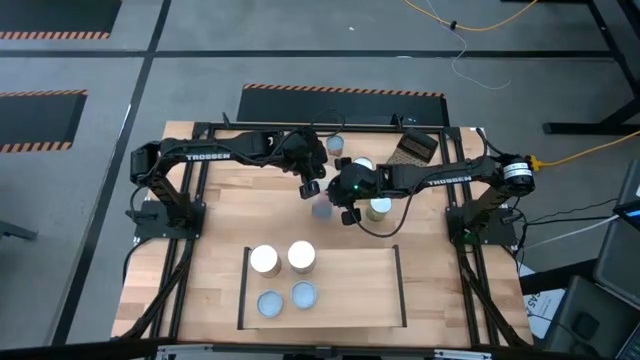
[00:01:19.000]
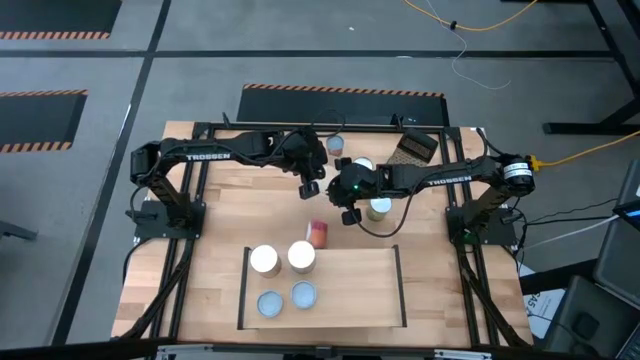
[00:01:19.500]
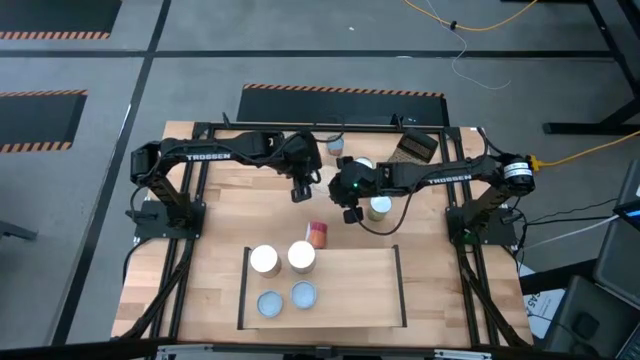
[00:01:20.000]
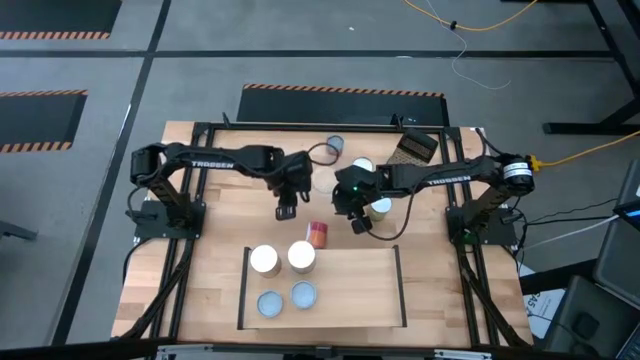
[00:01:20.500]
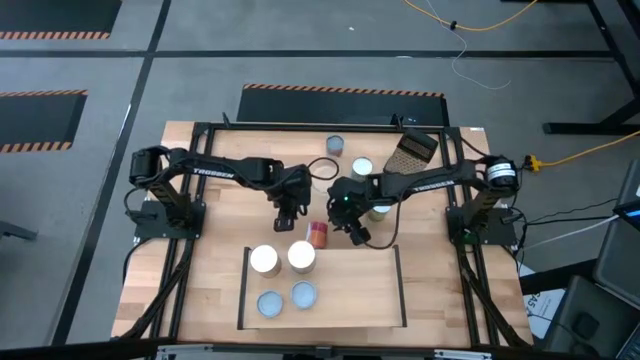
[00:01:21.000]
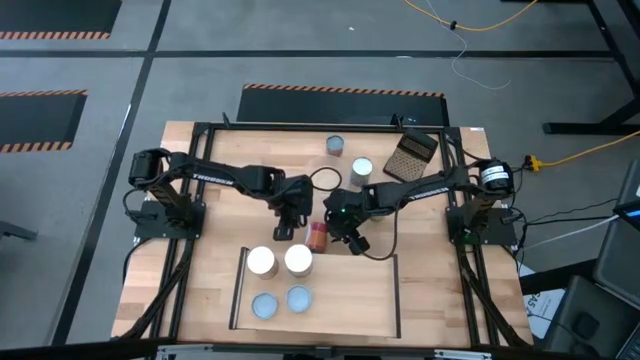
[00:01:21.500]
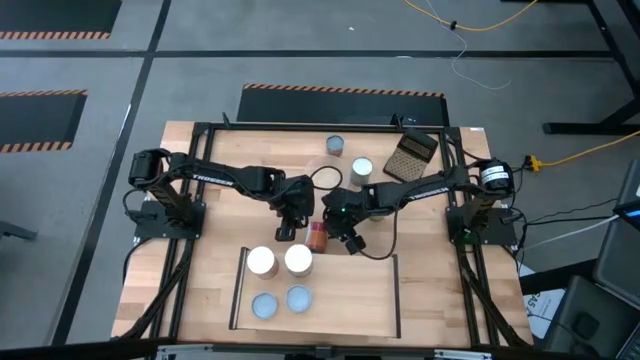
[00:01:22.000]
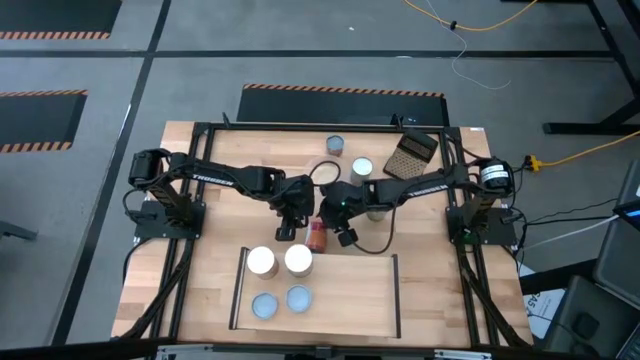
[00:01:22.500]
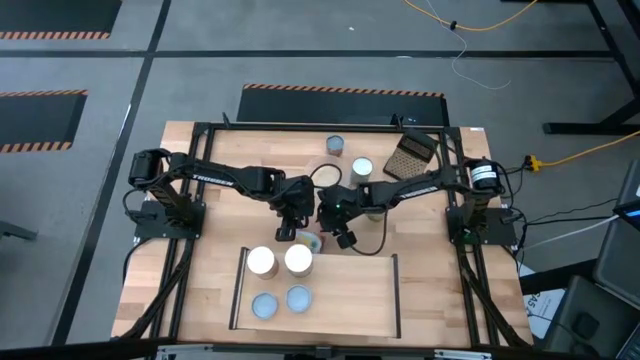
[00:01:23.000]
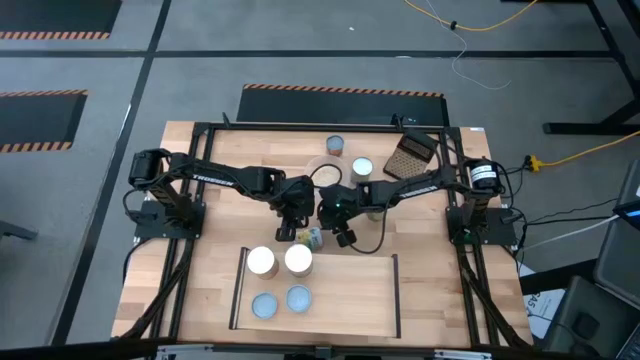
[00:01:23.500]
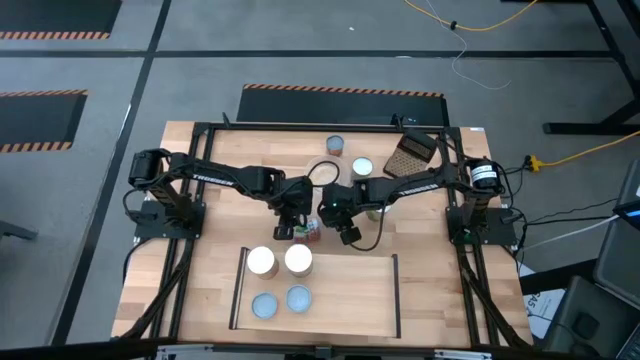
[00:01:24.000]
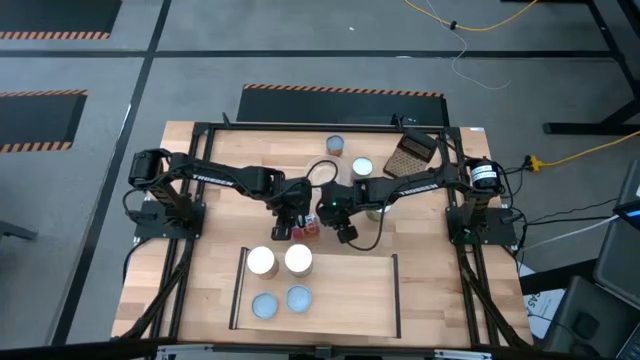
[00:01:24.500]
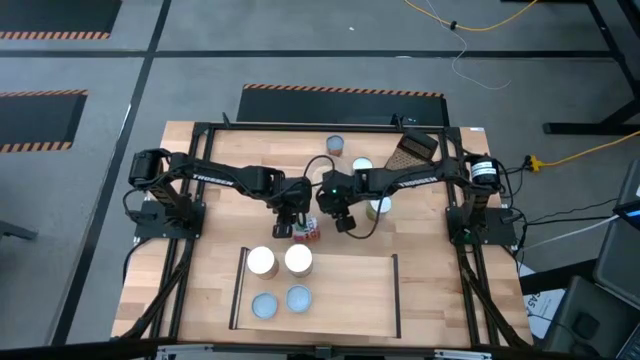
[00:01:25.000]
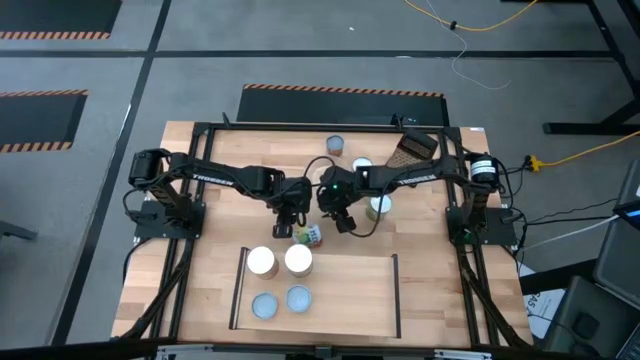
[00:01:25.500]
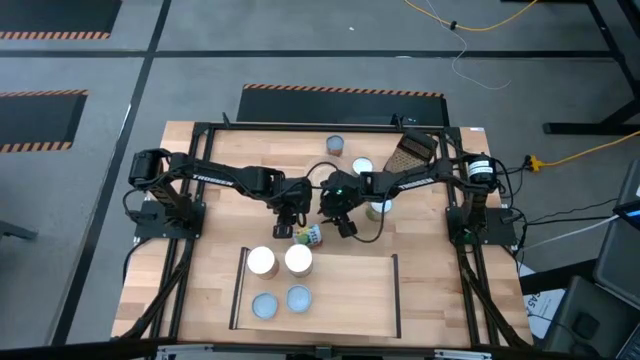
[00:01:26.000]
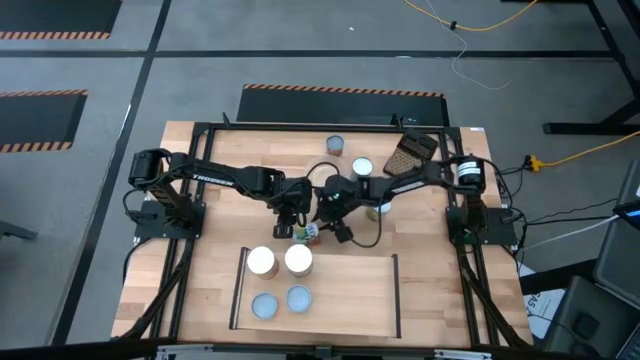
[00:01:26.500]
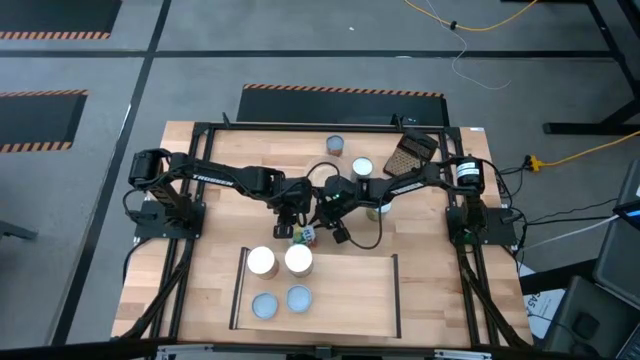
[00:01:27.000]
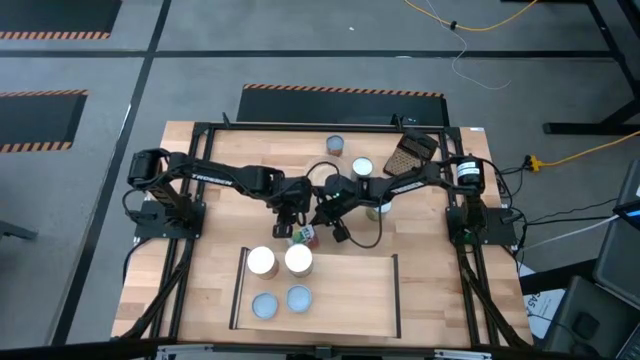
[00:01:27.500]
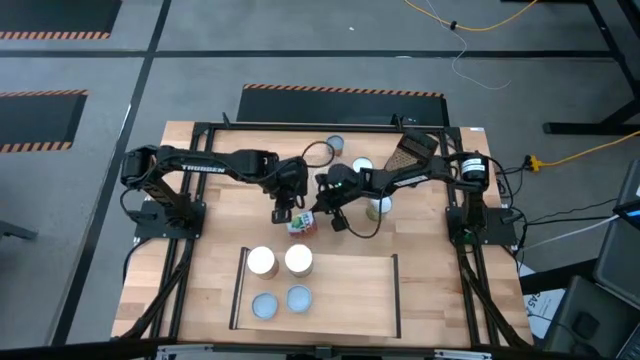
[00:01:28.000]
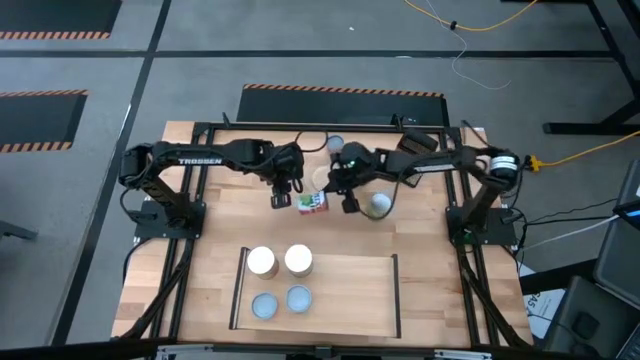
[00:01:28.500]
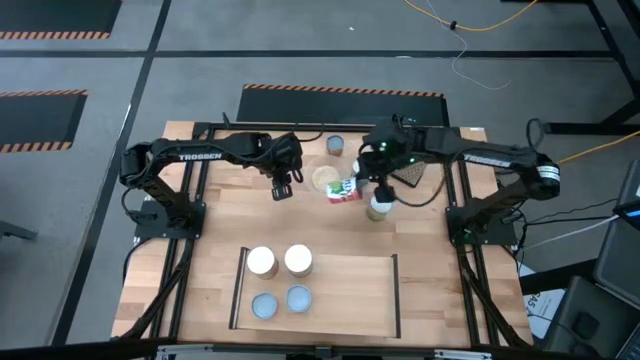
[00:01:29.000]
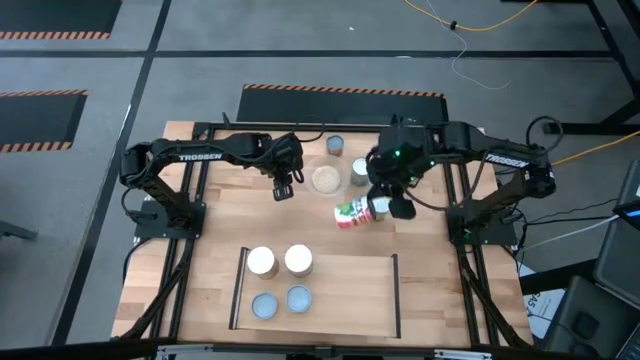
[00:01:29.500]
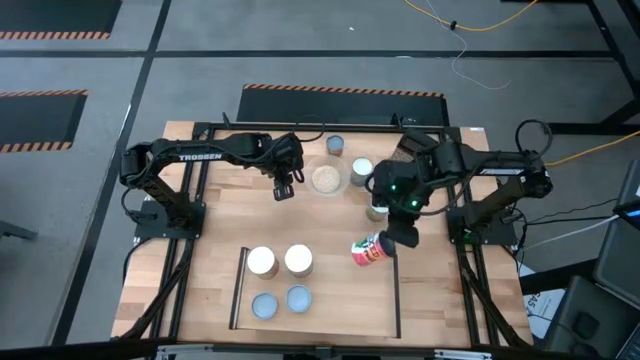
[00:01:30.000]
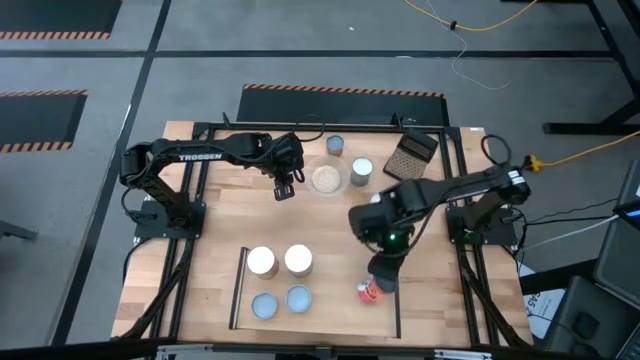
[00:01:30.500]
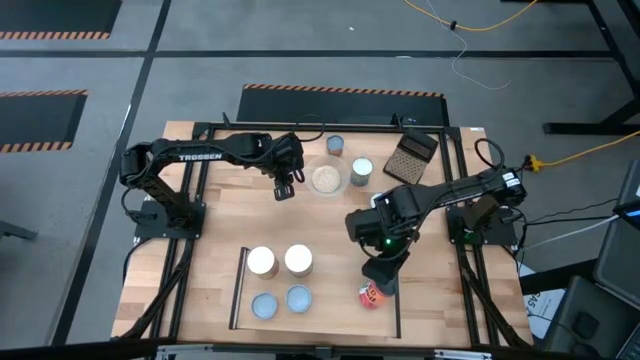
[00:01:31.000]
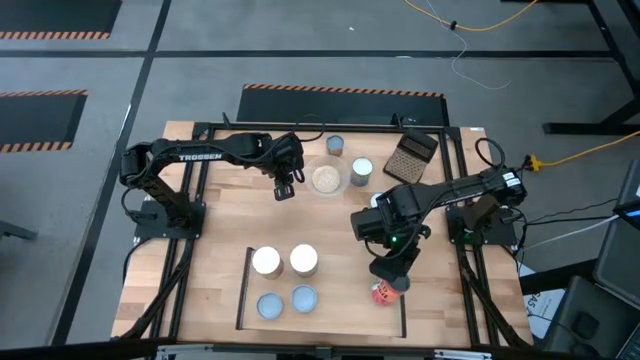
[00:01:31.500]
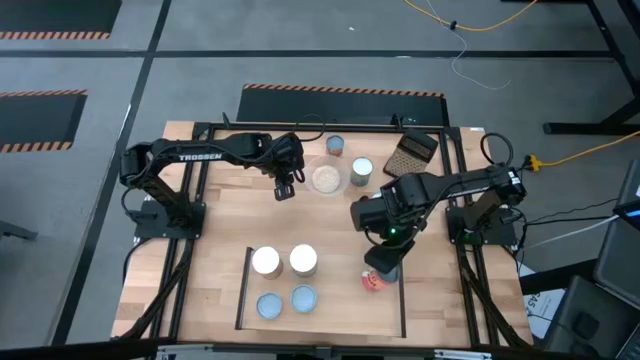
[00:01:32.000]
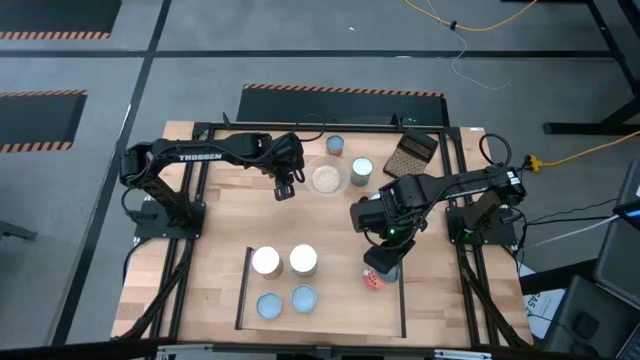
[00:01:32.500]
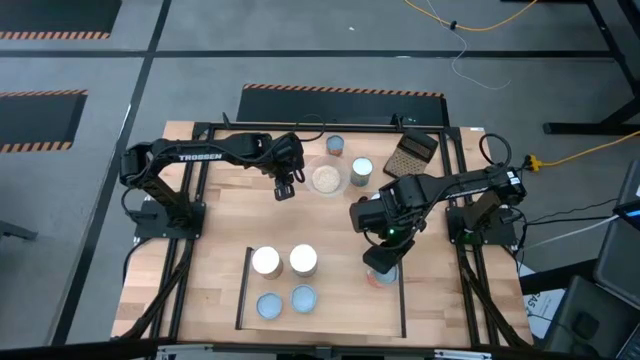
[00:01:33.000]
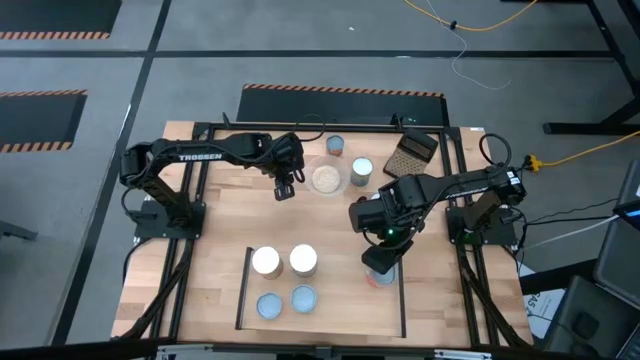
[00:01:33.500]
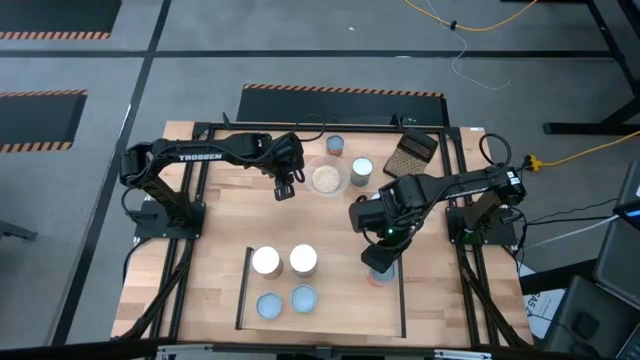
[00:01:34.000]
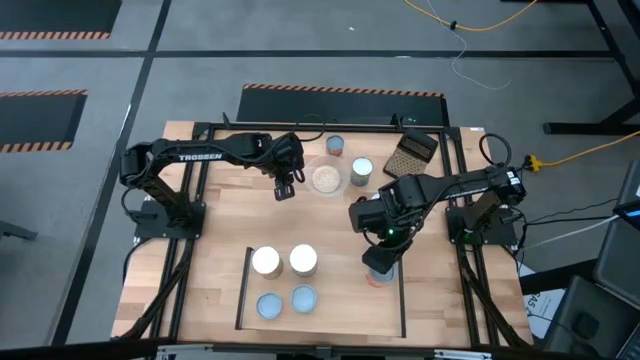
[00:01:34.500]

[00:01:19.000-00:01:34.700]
Task: Pick and place cans onto a shelf
Put the canned mixed fruit on the shelf

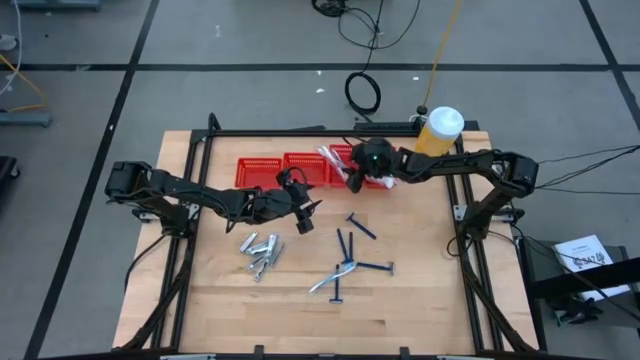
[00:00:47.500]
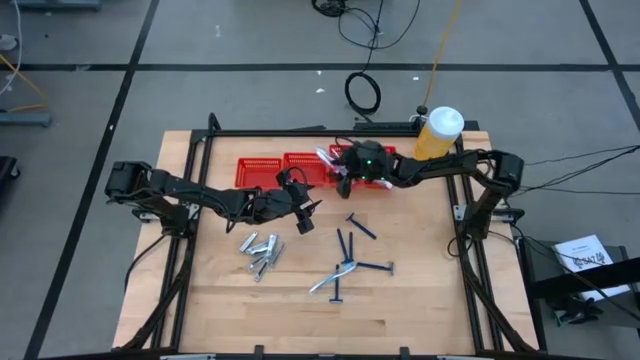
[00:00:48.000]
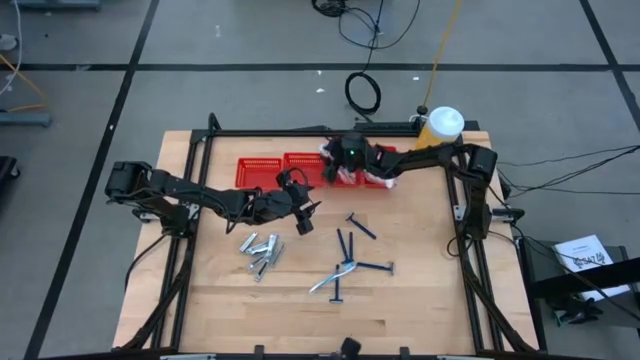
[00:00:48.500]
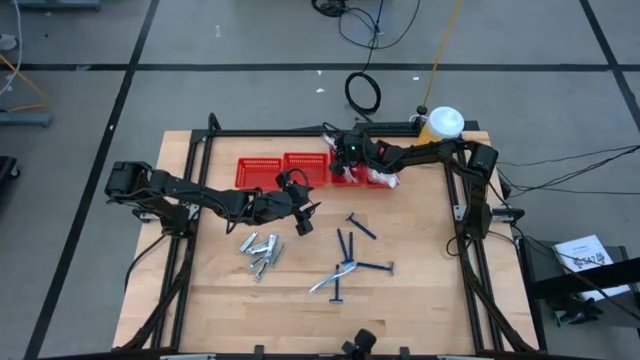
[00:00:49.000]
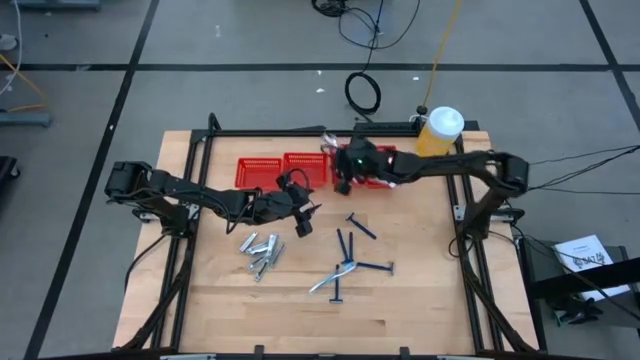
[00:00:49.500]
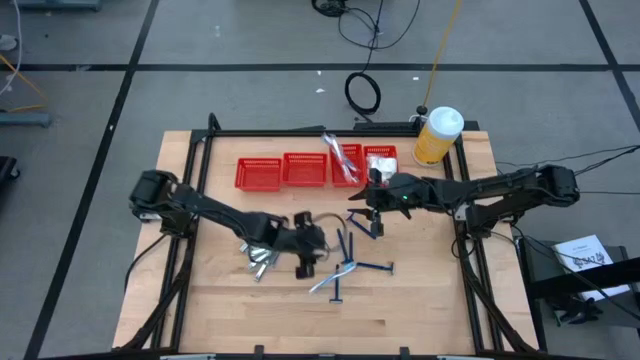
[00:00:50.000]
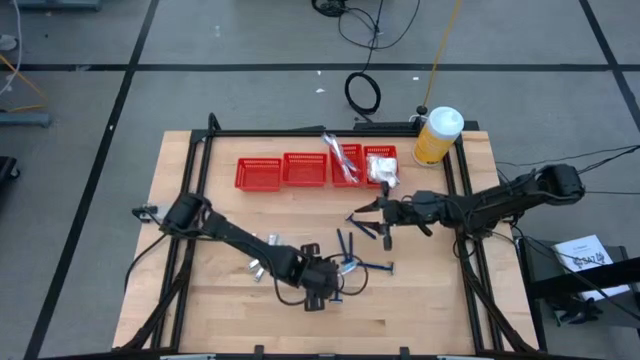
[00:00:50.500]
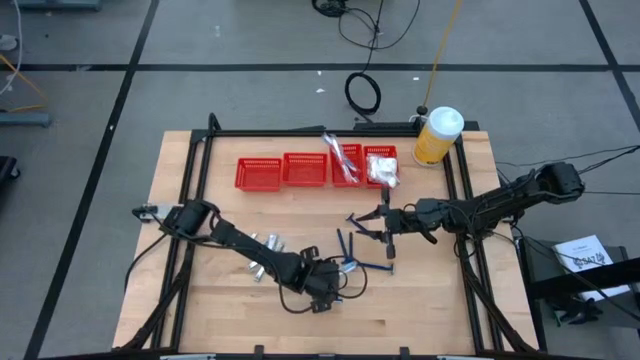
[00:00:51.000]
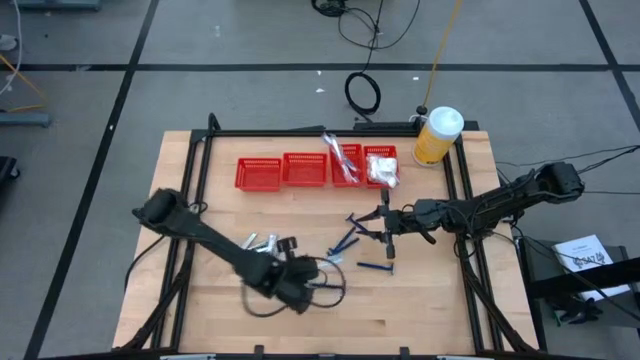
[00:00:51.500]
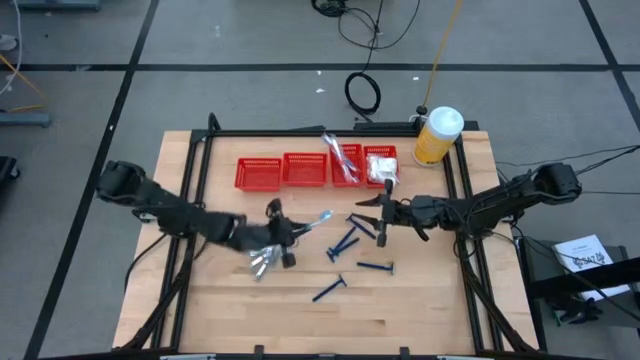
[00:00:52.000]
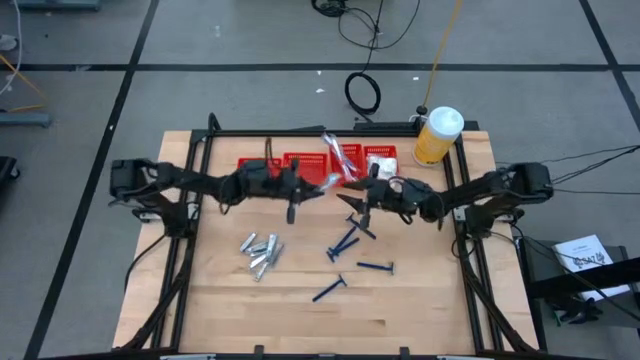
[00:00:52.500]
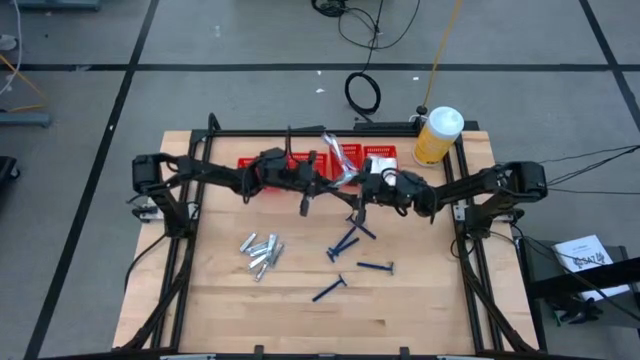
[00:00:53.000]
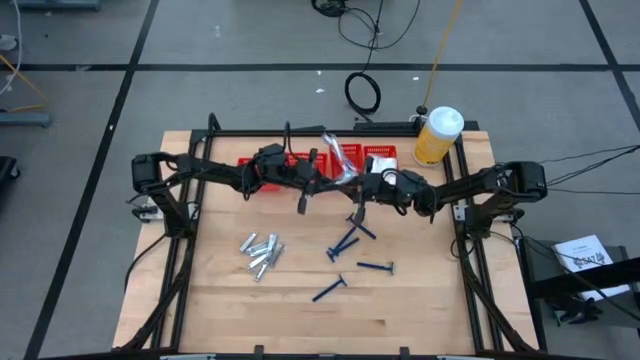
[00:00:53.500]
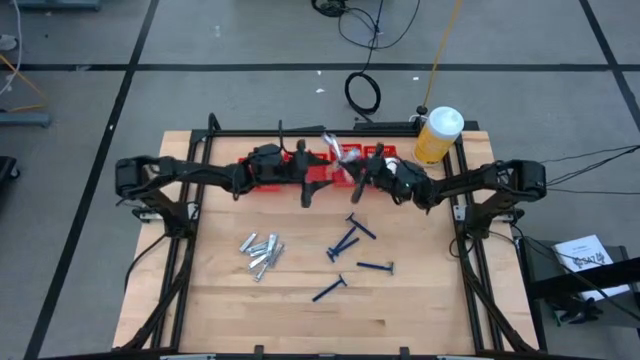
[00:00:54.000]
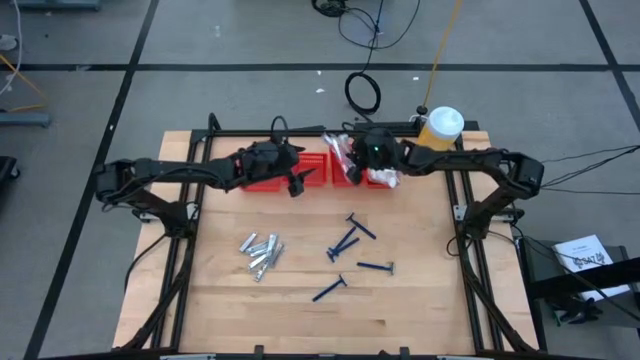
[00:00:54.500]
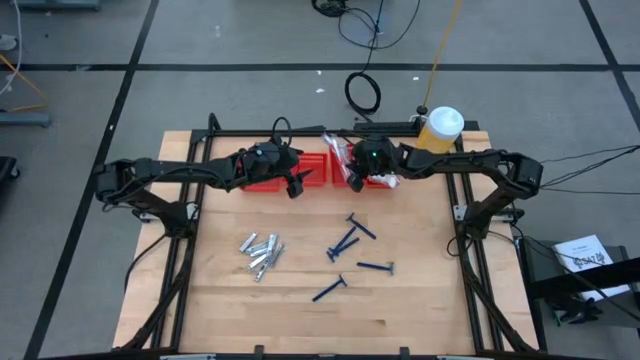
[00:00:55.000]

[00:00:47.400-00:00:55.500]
Task: Pick & Place Travel size toiletries
Put the blue toothbrush into the vertical left red bin
